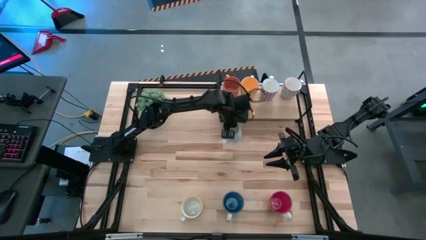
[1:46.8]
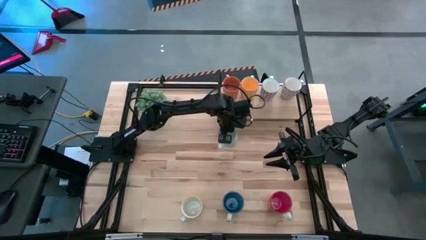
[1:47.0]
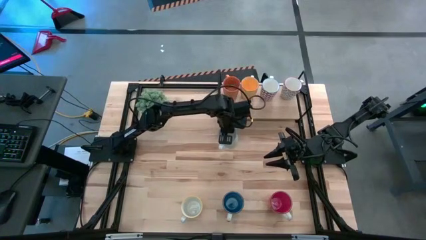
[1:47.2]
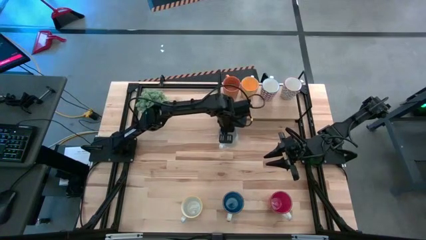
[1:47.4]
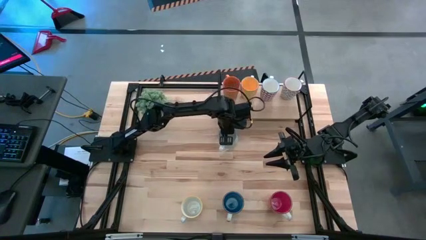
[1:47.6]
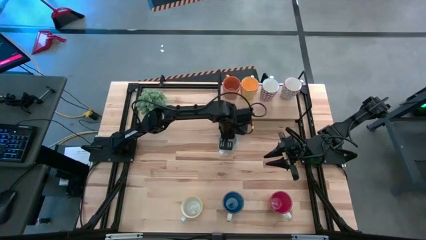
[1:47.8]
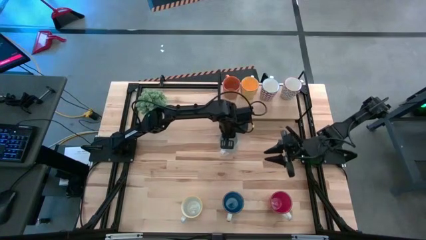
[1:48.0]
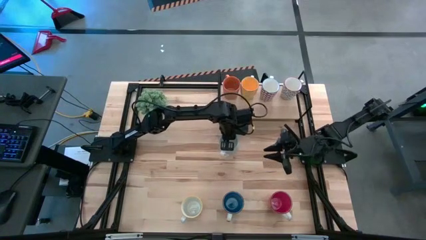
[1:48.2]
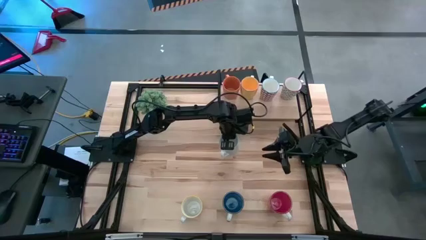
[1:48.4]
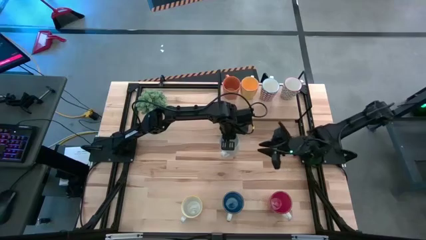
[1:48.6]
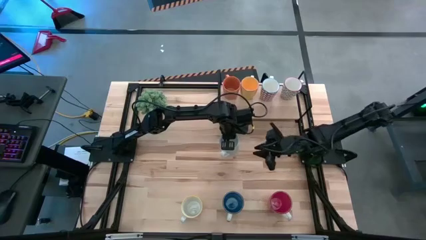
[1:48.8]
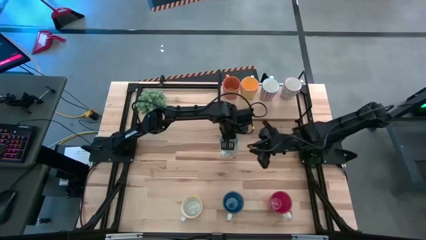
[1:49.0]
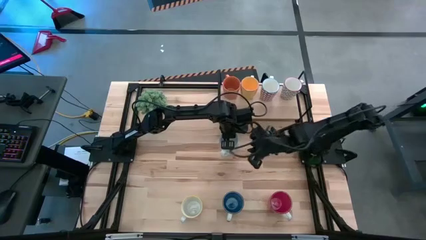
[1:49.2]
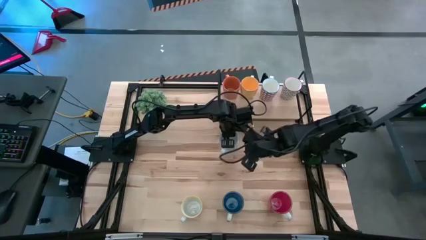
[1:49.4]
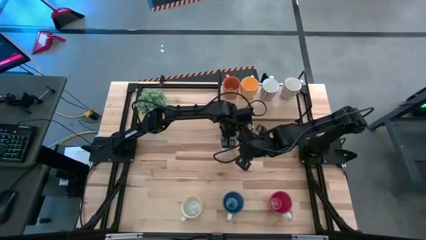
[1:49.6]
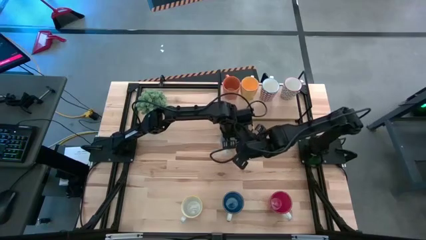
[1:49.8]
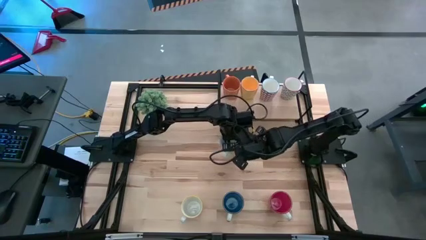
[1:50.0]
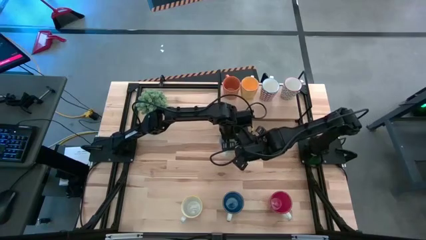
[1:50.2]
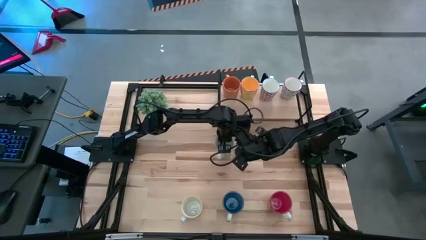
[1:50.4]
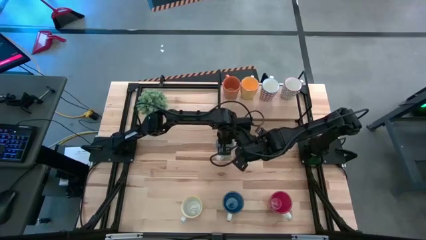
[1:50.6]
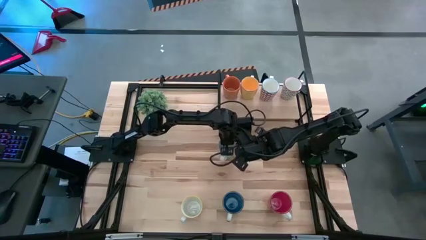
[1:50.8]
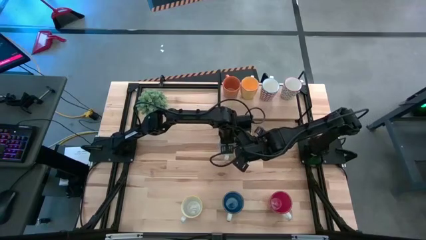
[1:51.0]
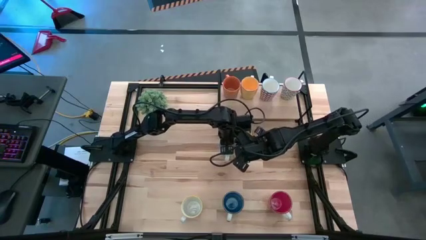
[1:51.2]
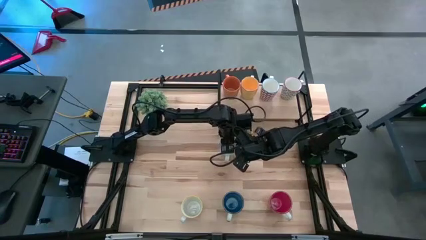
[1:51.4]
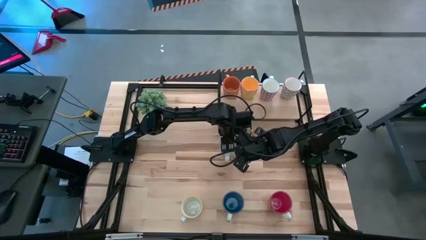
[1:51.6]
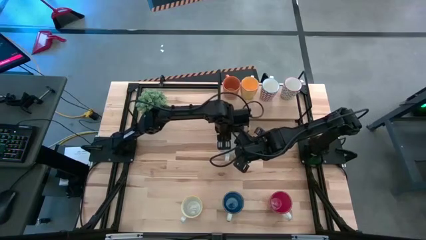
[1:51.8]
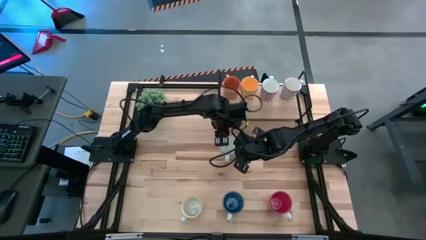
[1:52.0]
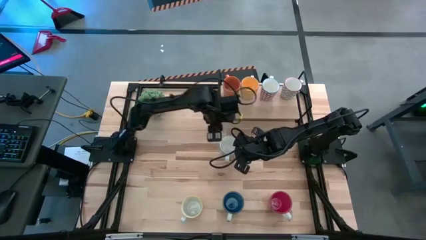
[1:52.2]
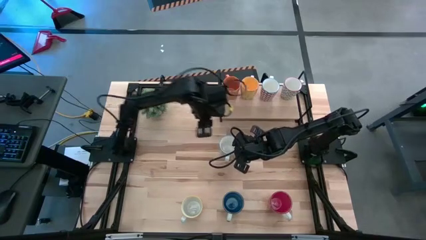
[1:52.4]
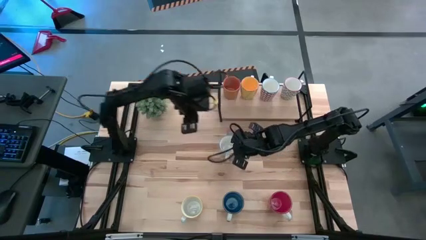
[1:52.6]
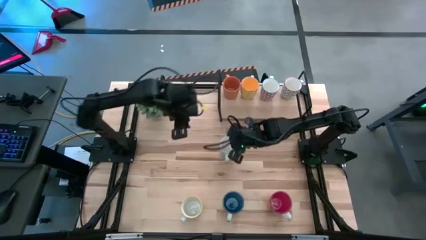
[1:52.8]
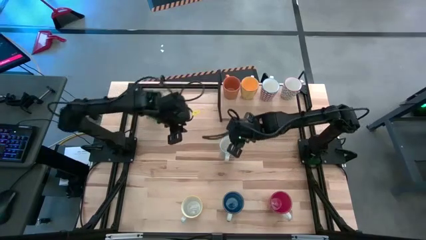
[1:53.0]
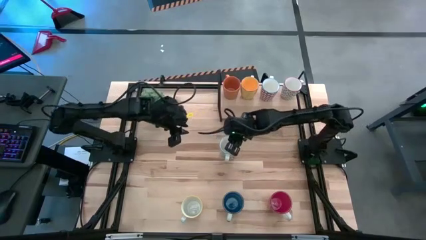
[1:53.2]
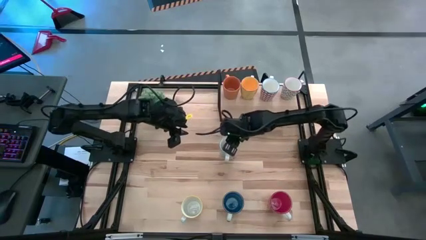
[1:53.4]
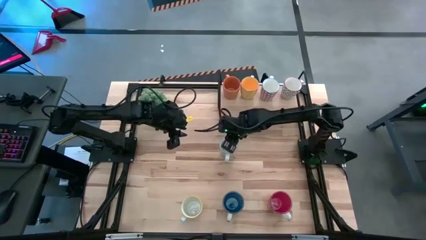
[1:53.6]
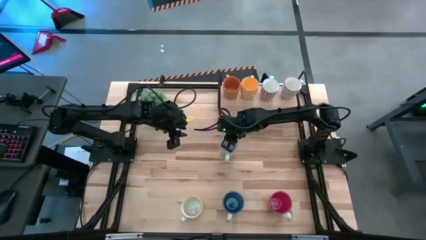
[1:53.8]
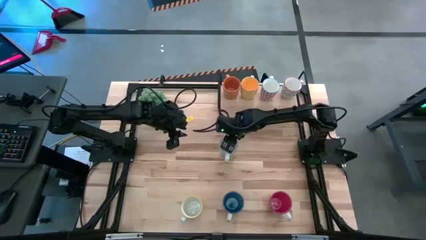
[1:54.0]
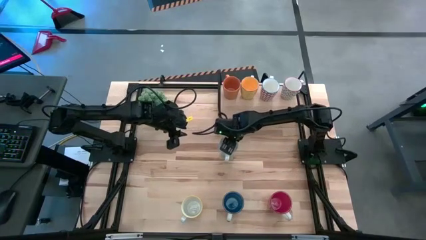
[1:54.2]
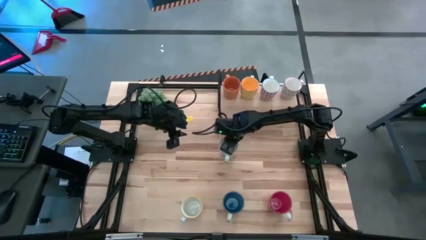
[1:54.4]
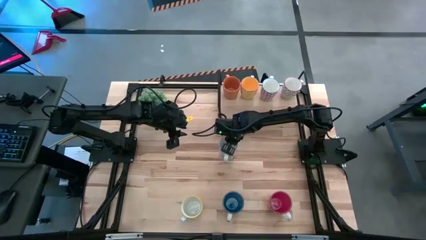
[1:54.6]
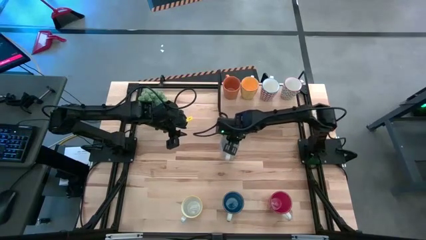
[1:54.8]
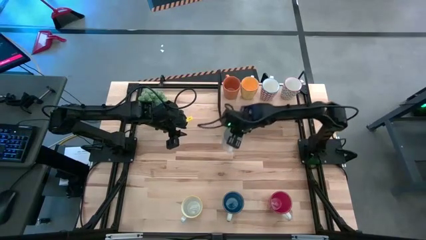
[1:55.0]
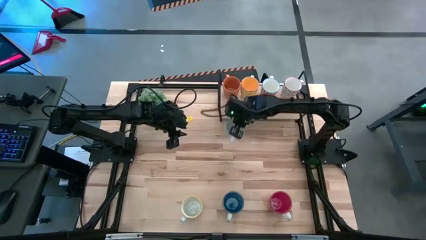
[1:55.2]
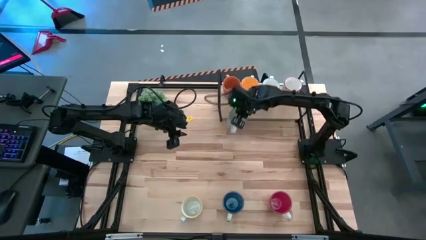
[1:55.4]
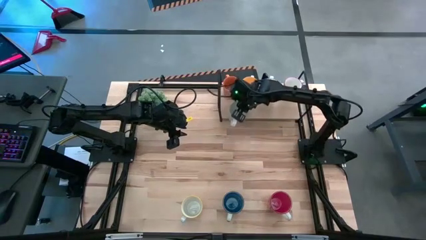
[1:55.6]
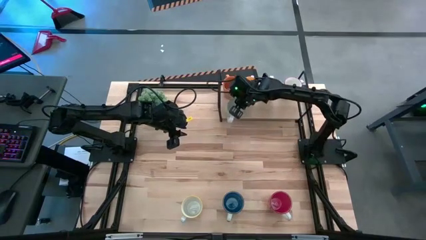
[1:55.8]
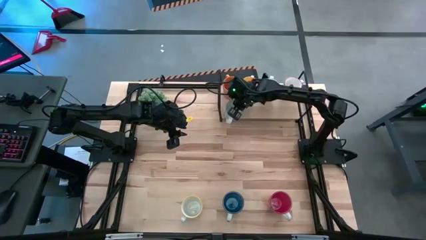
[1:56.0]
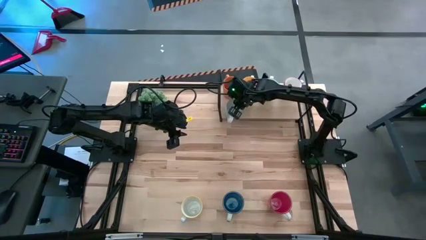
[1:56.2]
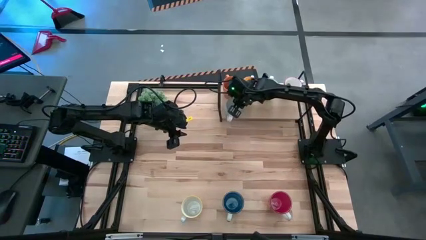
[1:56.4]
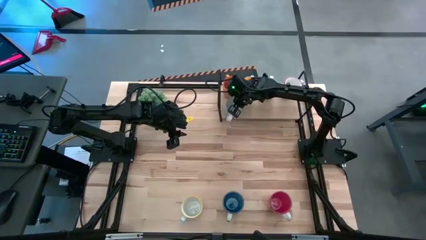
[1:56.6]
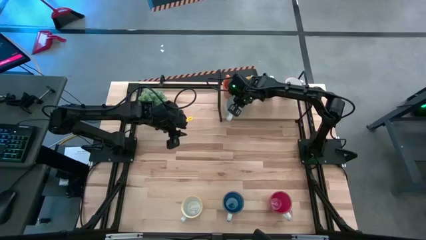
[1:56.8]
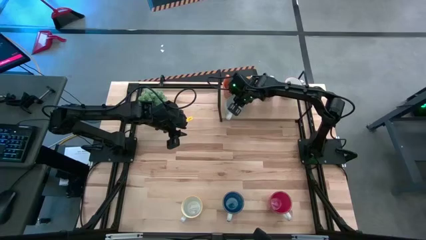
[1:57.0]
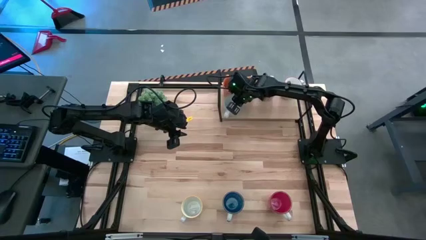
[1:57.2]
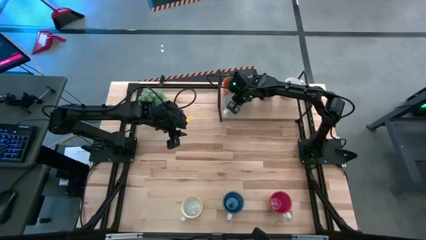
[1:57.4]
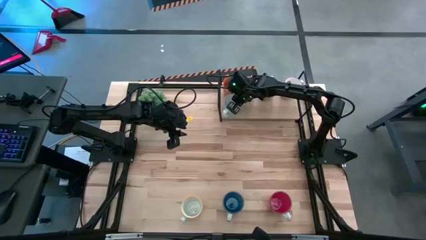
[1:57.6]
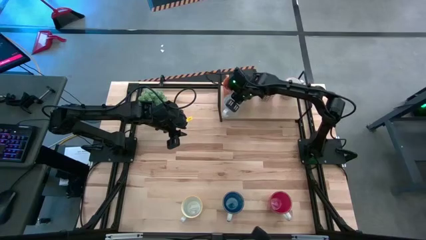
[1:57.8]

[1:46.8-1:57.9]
Task: Place coffee mugs
Put the green patterned mug on the shelf

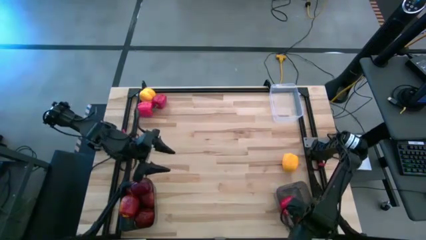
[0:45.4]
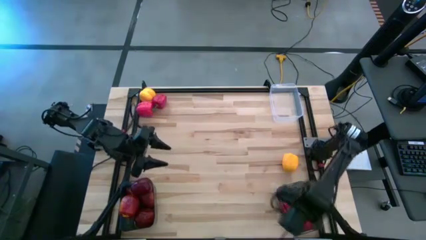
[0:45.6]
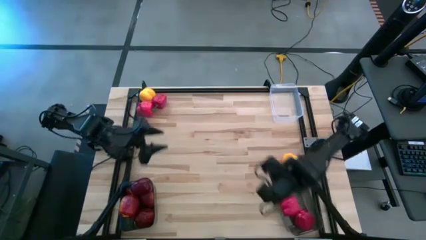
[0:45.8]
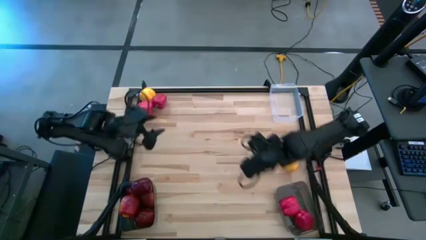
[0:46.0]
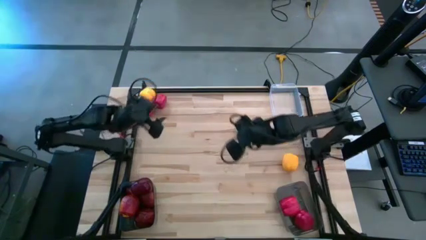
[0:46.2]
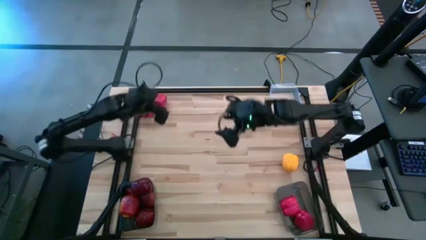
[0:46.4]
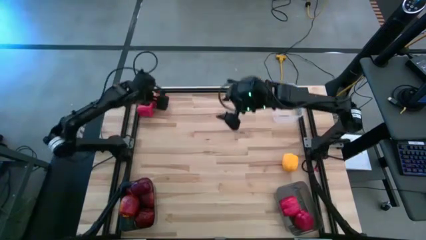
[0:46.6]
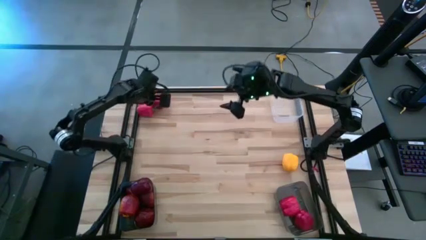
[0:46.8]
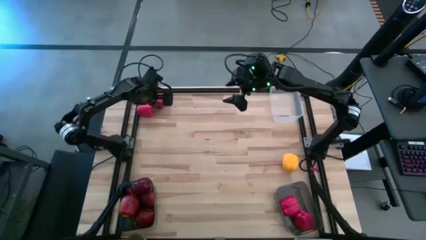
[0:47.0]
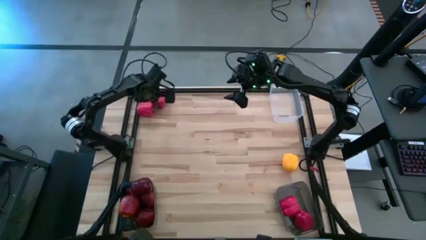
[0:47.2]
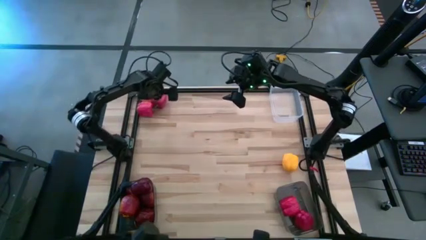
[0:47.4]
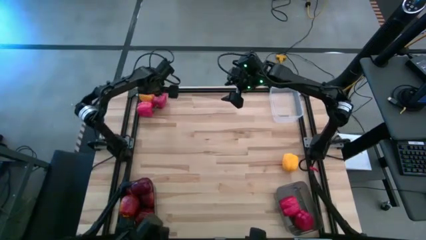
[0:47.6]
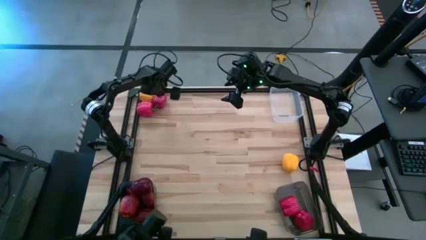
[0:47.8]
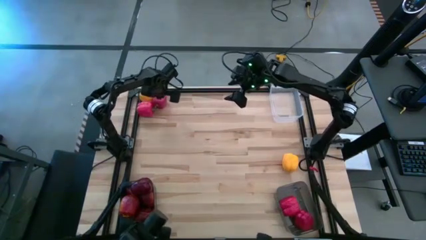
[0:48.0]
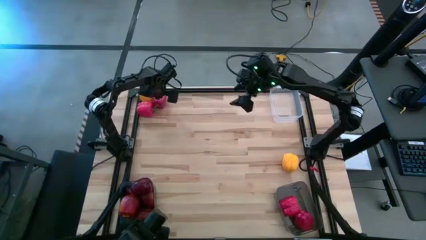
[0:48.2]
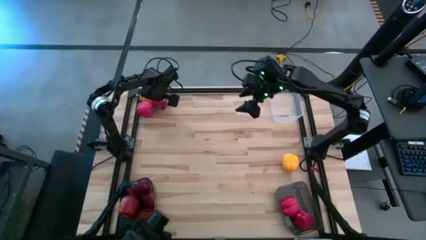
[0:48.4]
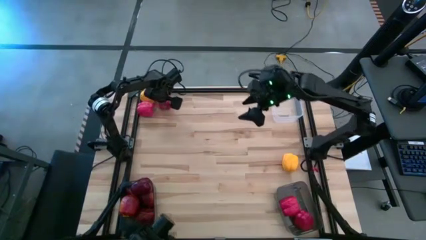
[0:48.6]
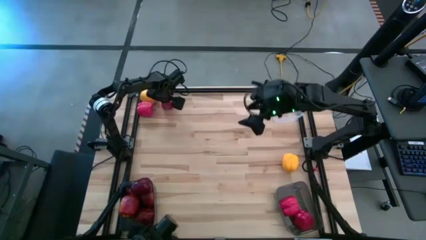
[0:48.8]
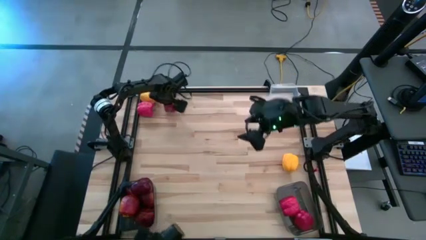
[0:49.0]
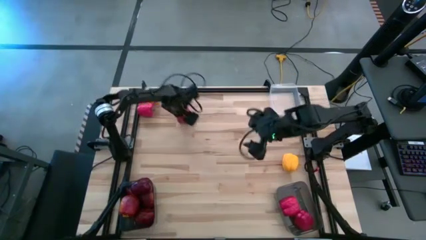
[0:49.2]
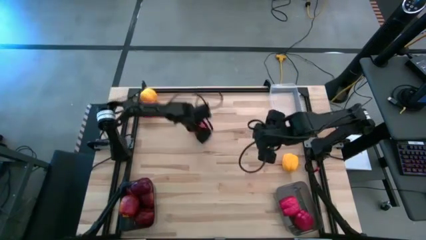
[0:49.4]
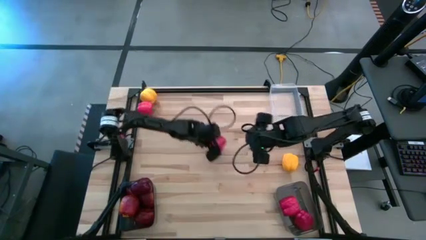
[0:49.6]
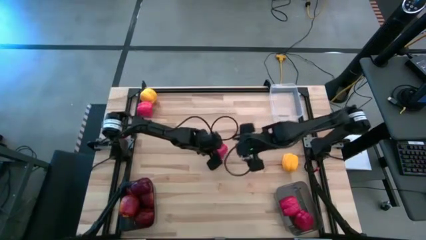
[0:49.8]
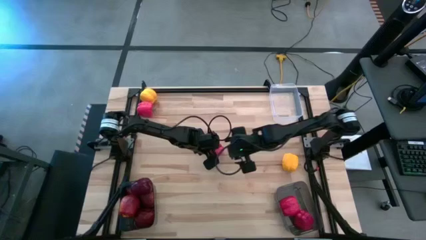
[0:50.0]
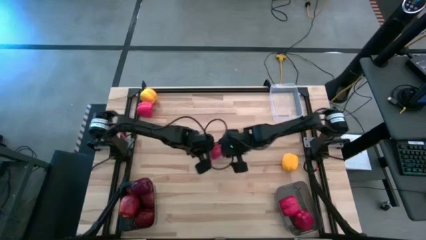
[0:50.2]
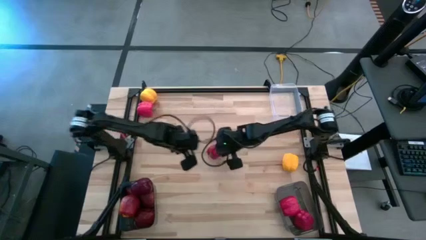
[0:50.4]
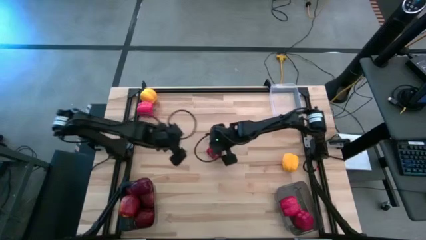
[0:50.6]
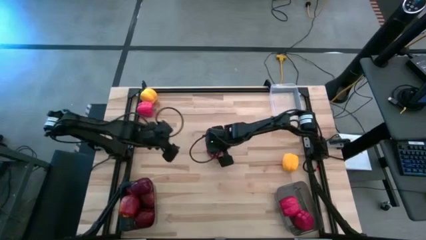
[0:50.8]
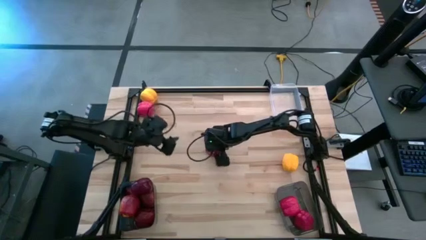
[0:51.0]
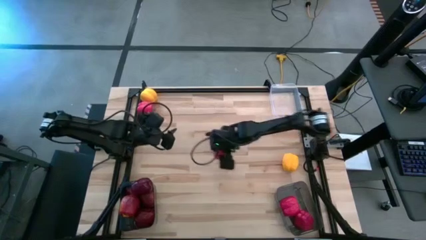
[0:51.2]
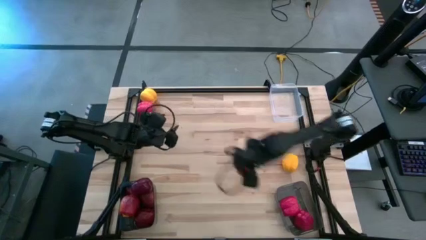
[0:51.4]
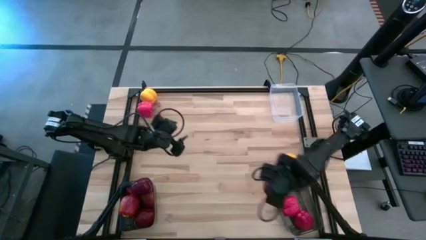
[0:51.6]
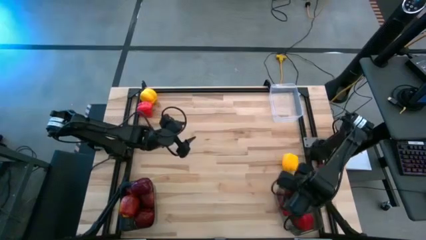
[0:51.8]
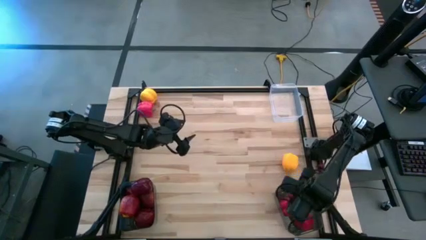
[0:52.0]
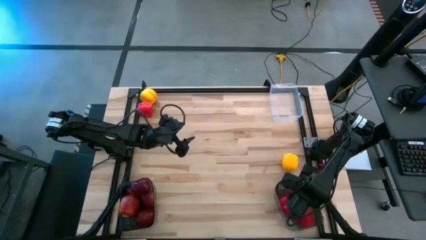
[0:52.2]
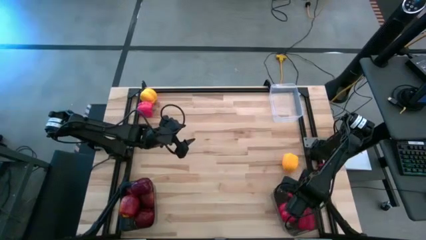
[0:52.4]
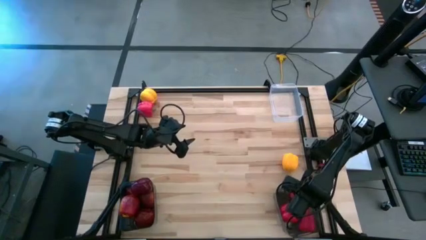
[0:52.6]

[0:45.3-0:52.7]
Task: Sort produce into baskets
Put the red bell pepper into the right black bin
